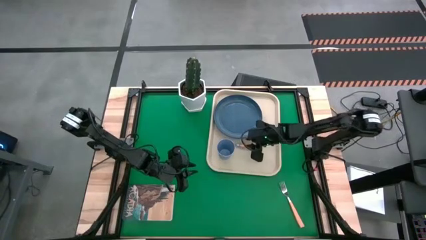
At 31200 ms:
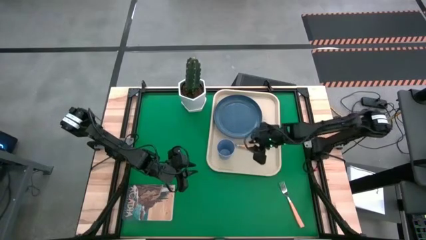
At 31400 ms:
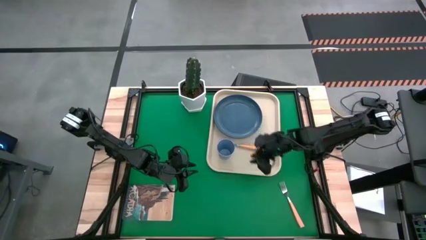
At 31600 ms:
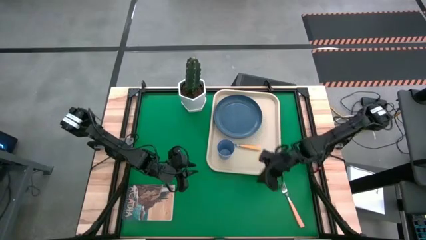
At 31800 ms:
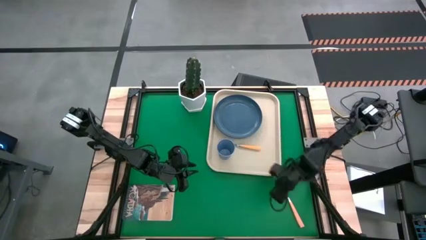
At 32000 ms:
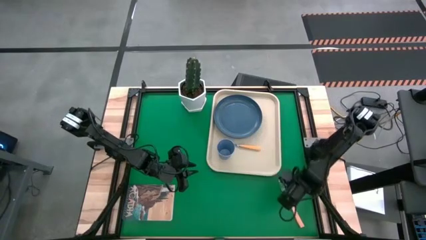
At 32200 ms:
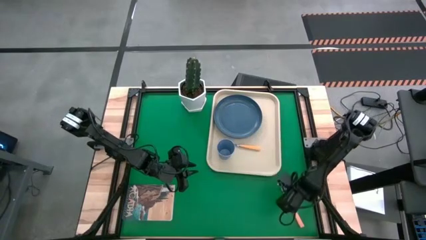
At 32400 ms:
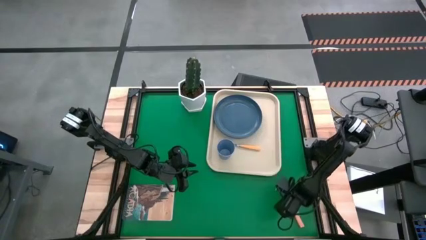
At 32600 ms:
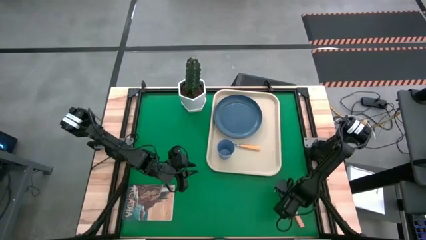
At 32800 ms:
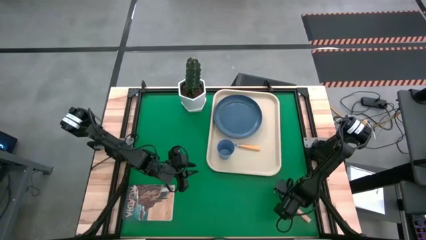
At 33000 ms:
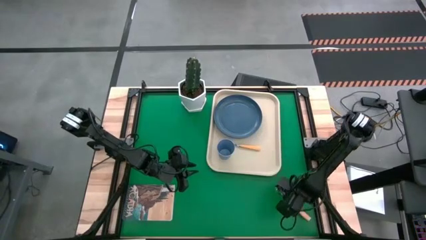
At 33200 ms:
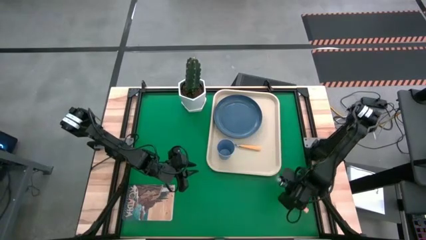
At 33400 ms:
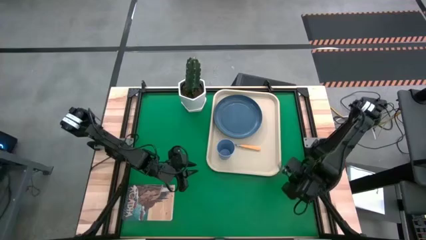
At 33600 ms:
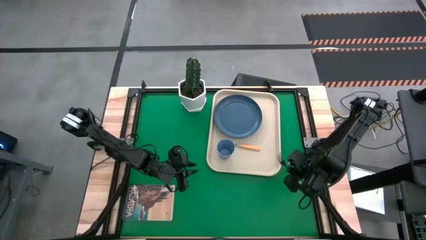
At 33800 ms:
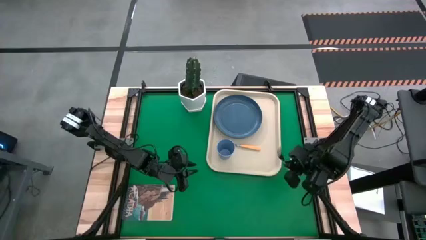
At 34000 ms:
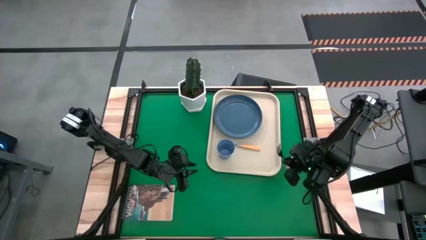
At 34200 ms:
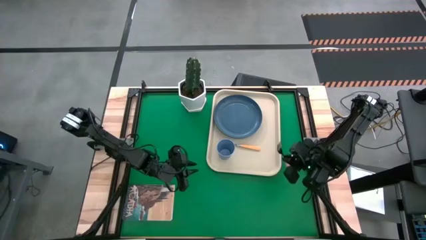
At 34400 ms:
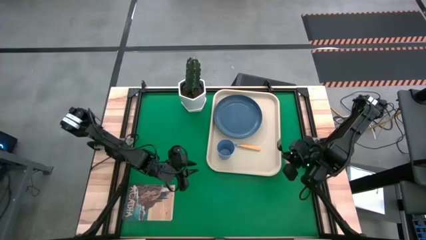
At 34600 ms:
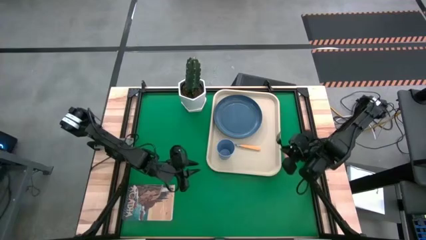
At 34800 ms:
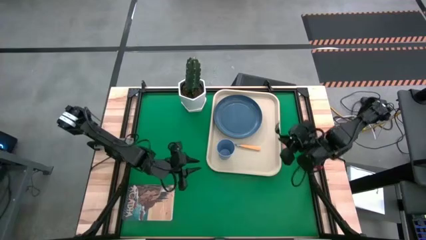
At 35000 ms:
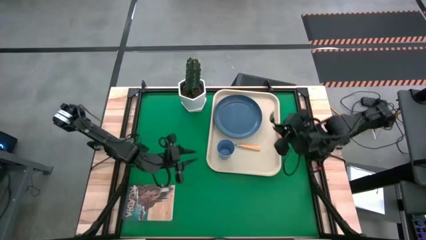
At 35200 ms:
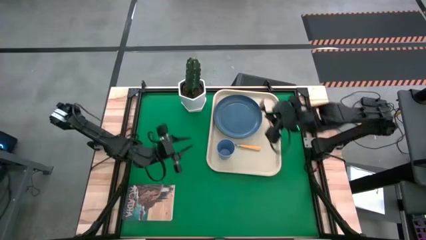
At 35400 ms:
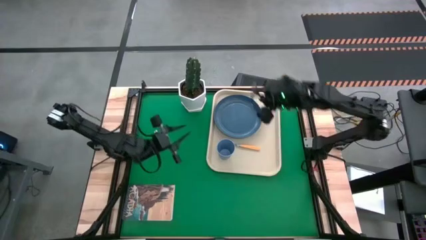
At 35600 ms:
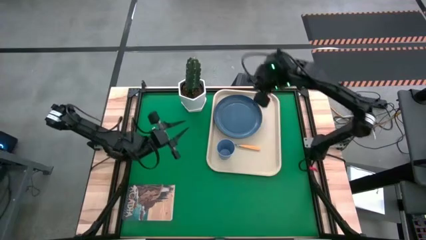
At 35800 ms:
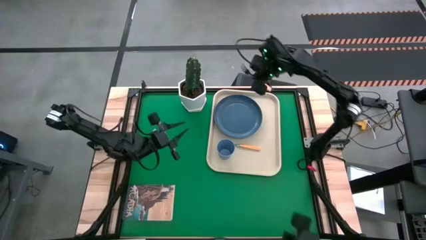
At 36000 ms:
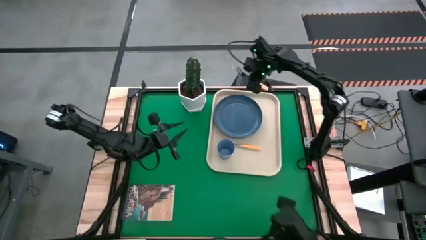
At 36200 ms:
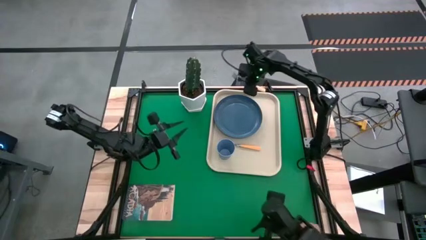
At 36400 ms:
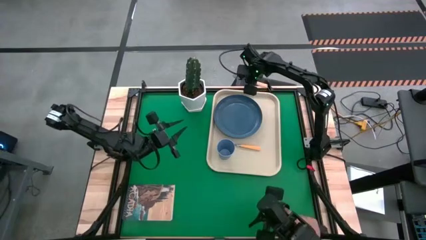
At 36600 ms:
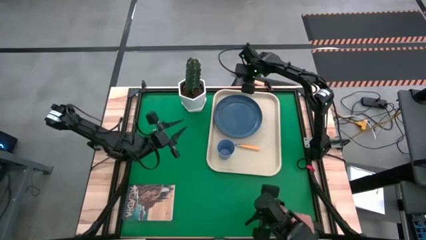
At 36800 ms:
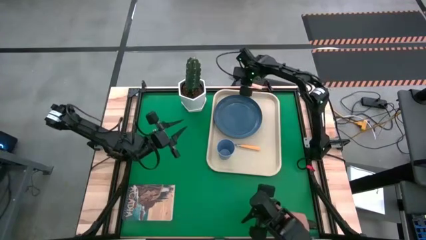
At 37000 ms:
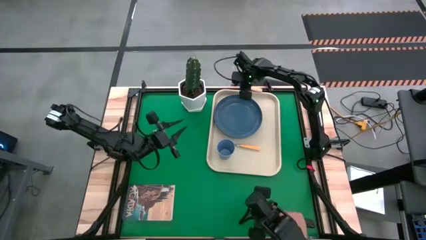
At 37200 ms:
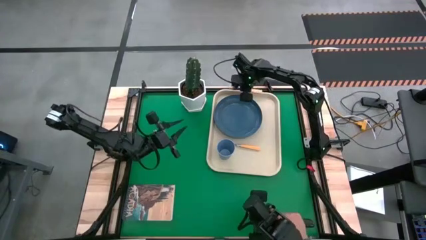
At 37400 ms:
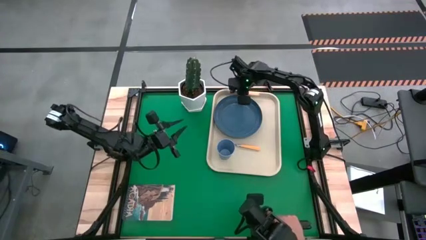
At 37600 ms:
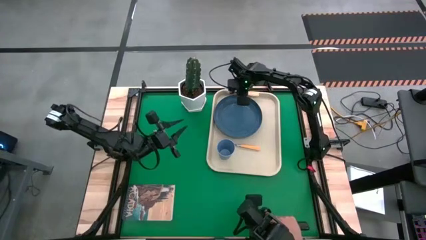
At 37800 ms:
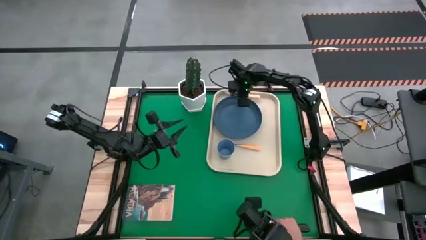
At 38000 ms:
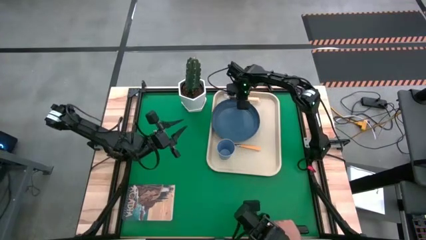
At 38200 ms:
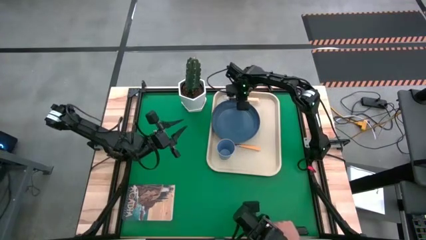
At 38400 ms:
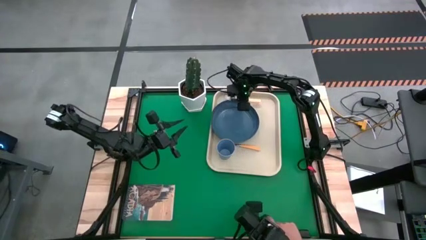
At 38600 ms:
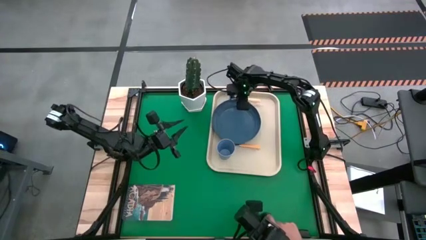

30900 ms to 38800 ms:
Task: Pick and place plate/cup/fork/spoon on tray
Put the light orange fork on the white serving tray at the top of the blue plate

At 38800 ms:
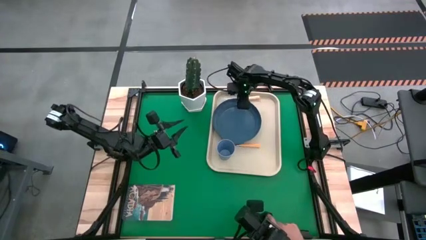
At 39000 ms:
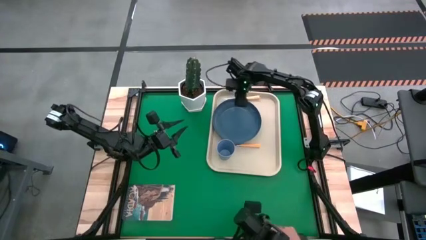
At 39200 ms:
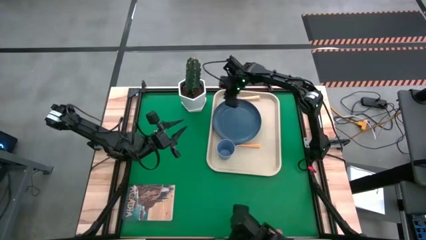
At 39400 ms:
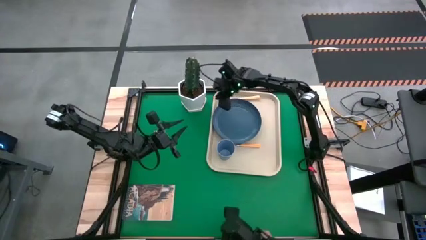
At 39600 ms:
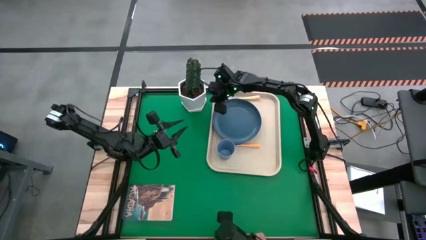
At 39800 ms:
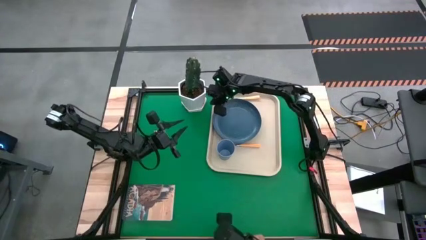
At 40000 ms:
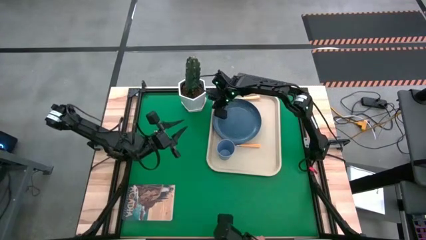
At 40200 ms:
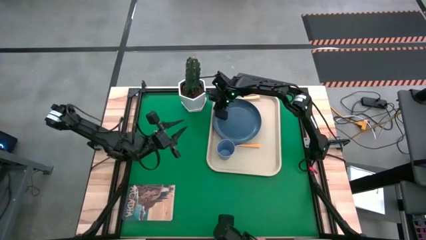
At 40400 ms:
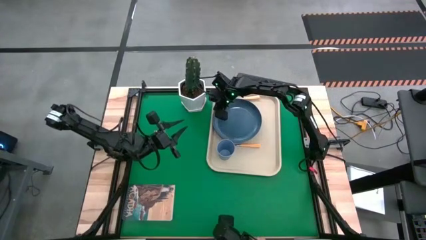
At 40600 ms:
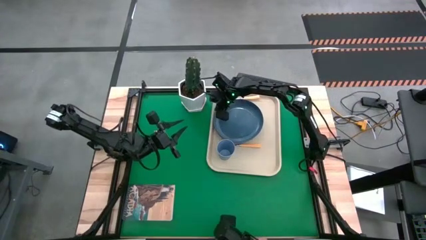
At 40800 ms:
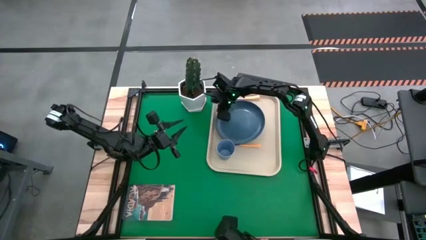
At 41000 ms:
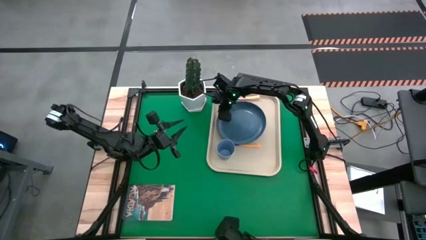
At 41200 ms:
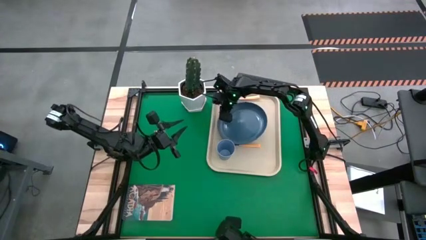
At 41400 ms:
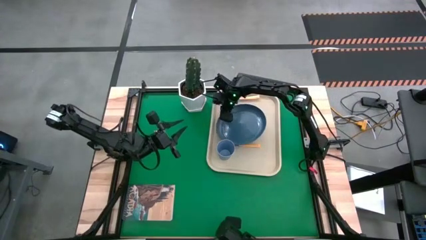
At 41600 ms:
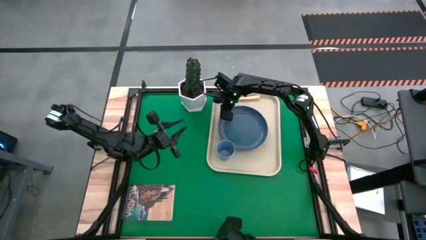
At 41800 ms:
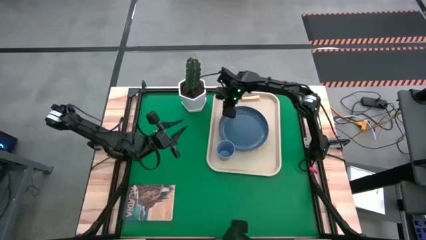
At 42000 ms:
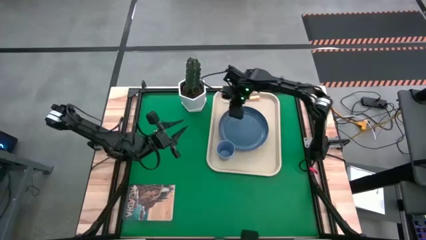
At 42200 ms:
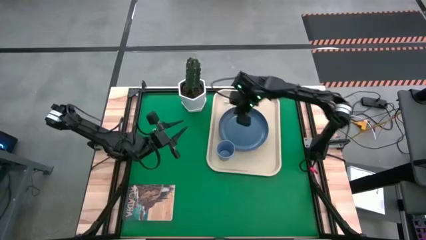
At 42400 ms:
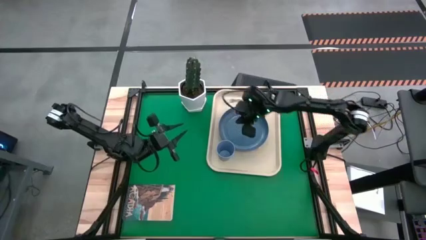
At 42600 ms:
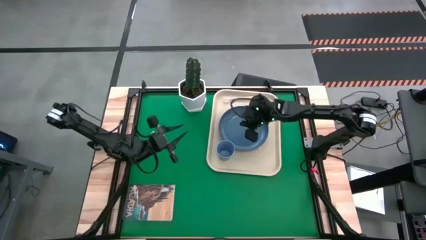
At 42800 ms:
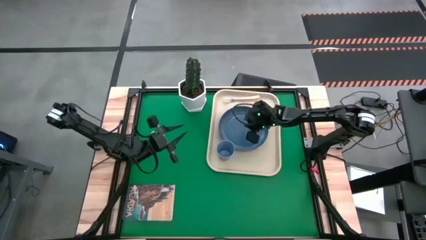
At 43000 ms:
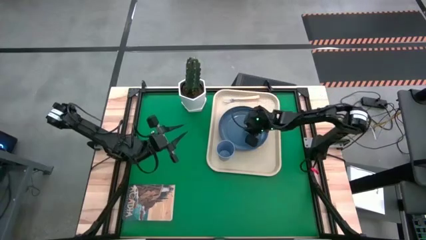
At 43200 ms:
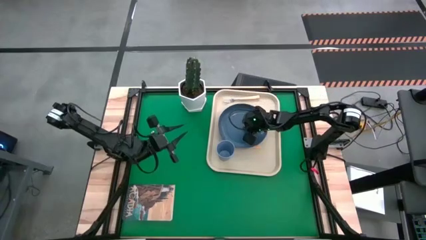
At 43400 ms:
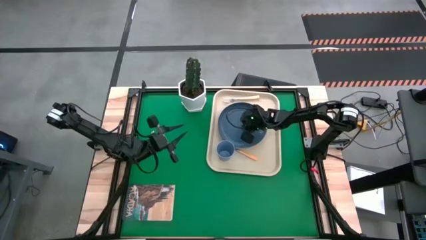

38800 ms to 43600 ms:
Adjust the blue plate on the white serving tray

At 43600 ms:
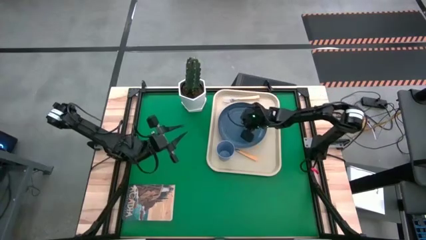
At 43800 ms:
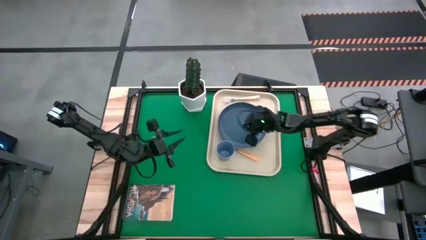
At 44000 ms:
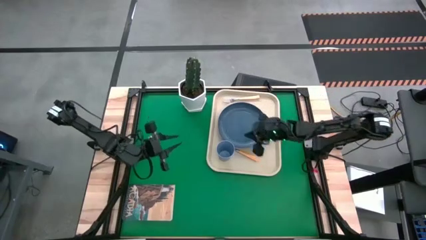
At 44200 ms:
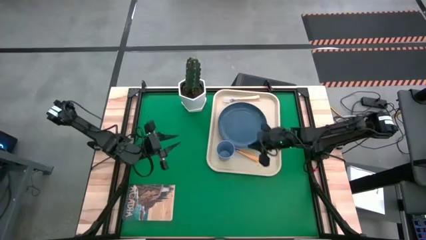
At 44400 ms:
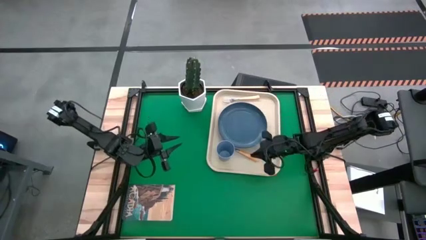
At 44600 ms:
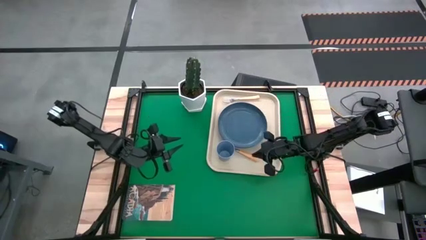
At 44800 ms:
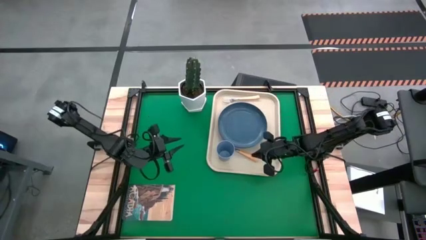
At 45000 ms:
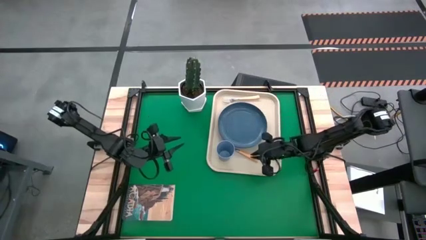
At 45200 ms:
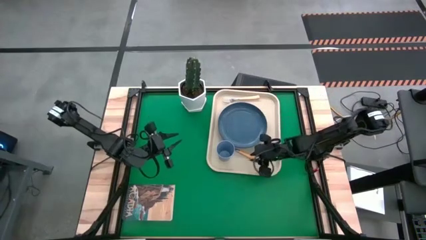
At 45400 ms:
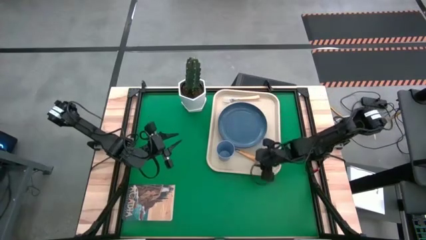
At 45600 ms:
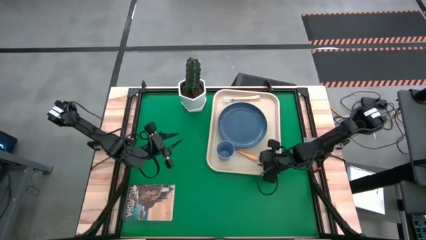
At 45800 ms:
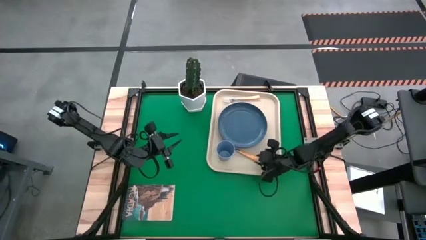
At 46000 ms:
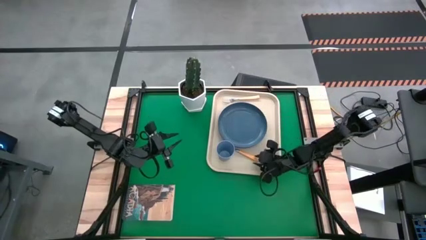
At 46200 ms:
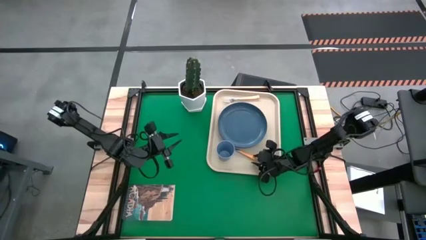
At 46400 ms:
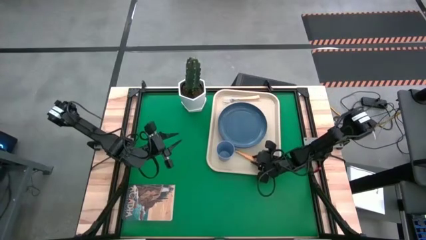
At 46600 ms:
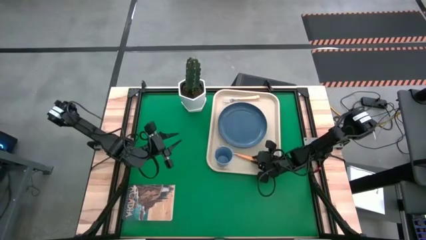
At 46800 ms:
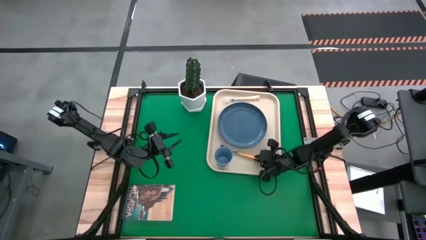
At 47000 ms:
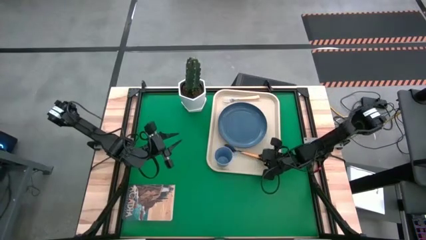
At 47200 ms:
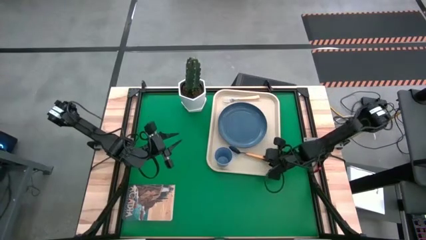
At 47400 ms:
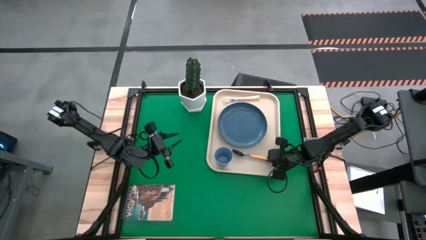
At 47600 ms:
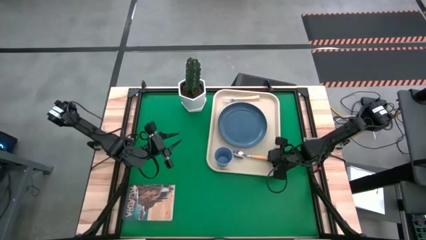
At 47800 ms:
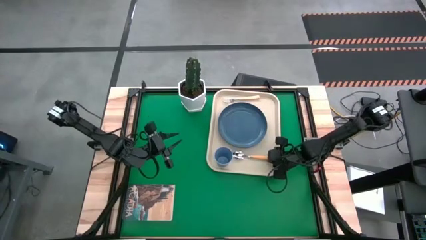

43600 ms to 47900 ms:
Adjust the yellow spoon on the white serving tray
